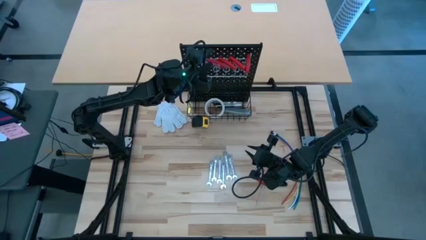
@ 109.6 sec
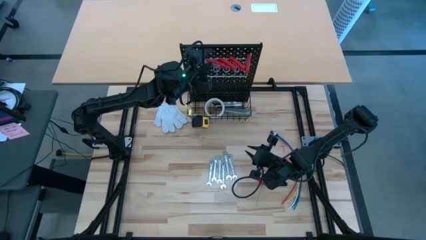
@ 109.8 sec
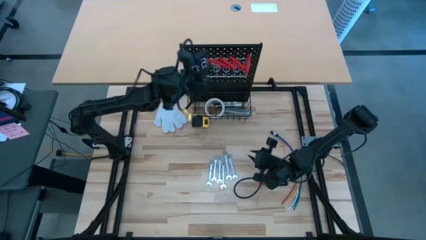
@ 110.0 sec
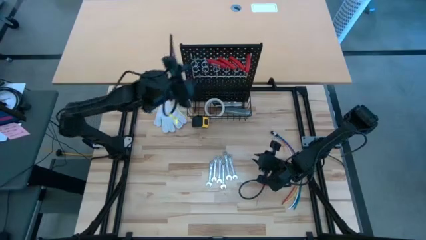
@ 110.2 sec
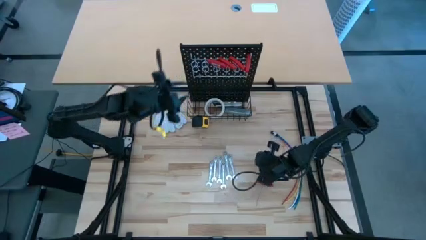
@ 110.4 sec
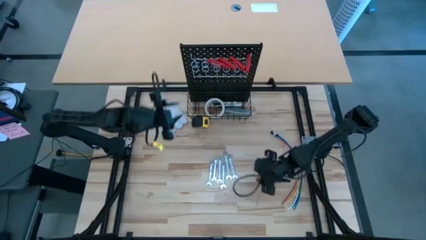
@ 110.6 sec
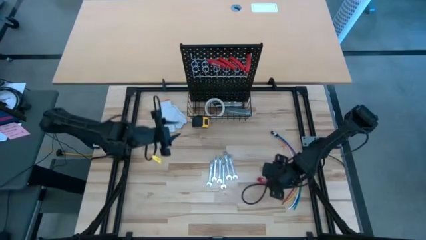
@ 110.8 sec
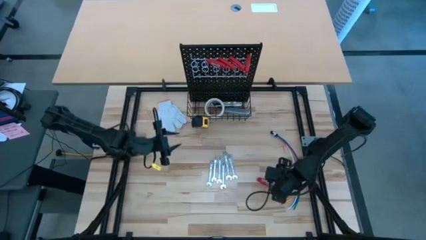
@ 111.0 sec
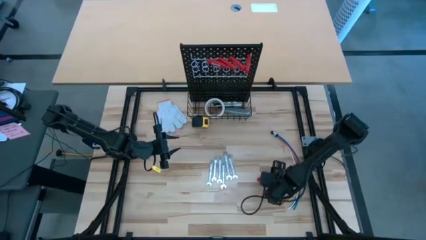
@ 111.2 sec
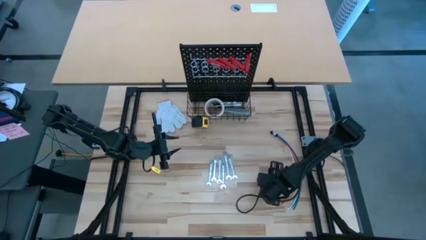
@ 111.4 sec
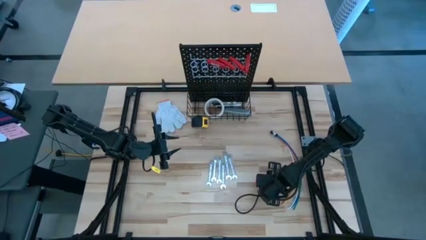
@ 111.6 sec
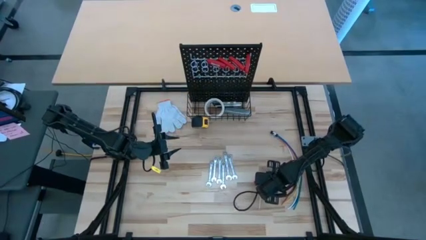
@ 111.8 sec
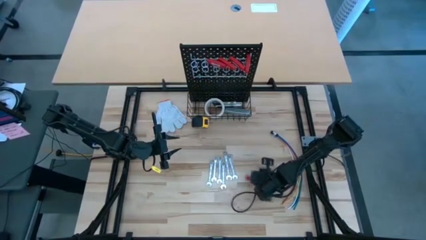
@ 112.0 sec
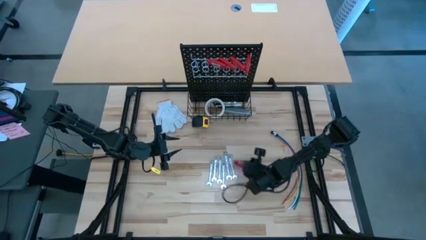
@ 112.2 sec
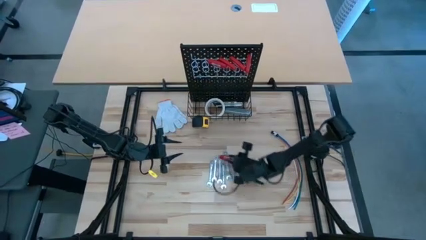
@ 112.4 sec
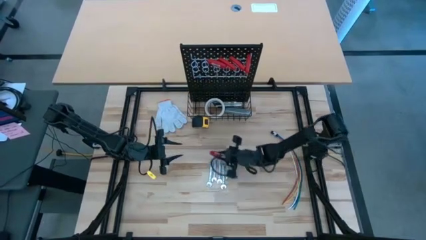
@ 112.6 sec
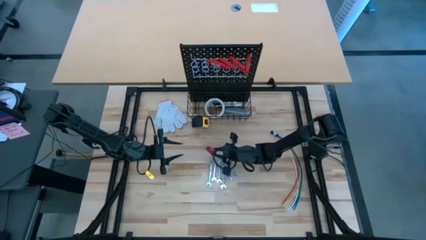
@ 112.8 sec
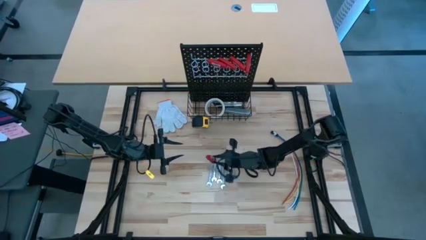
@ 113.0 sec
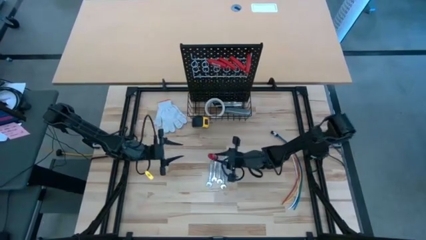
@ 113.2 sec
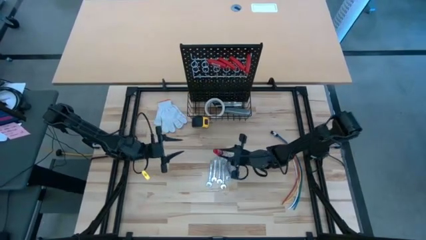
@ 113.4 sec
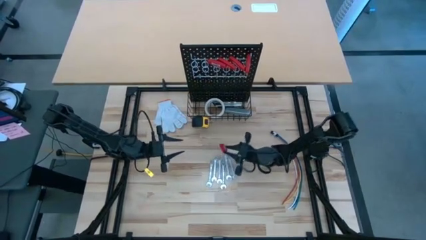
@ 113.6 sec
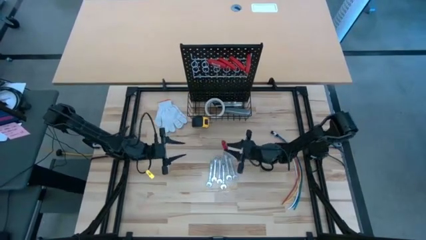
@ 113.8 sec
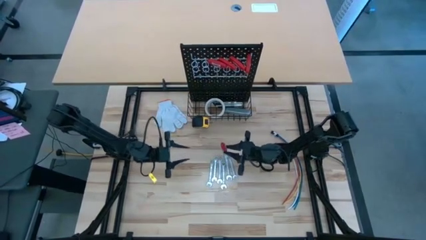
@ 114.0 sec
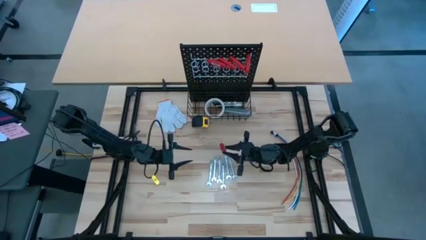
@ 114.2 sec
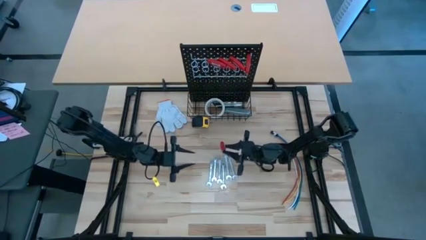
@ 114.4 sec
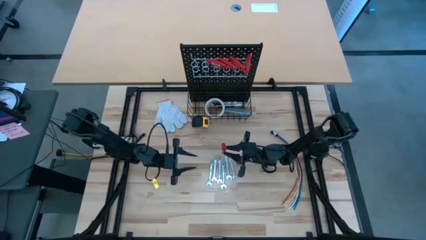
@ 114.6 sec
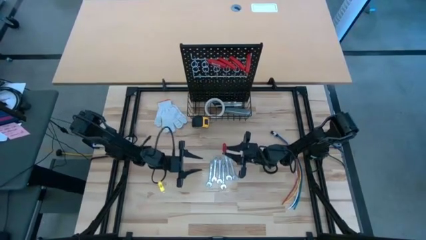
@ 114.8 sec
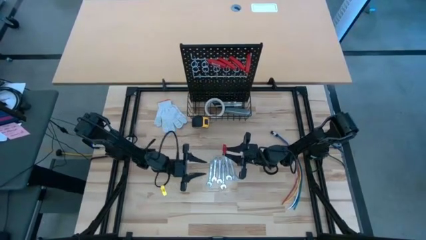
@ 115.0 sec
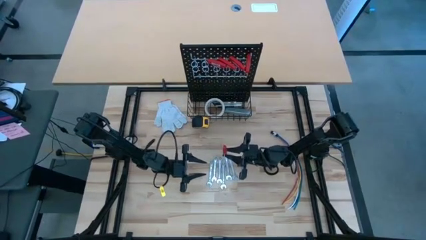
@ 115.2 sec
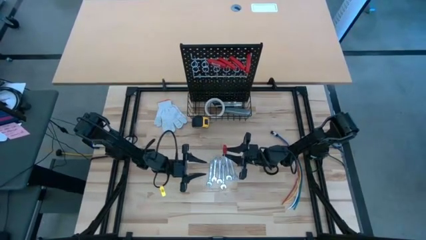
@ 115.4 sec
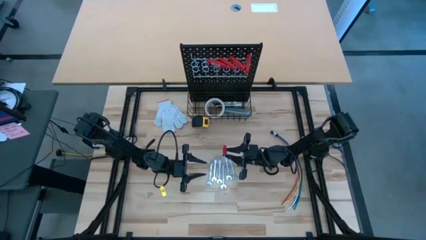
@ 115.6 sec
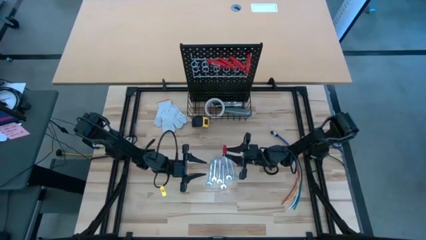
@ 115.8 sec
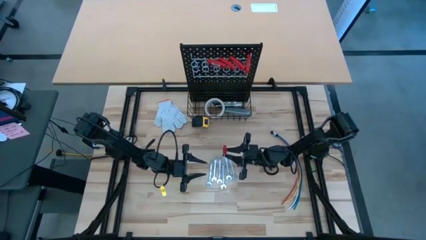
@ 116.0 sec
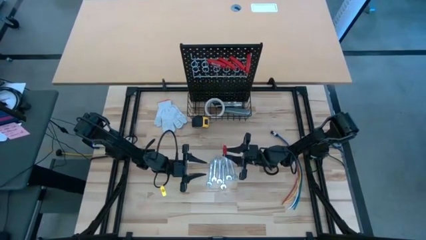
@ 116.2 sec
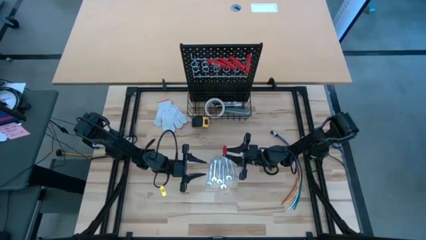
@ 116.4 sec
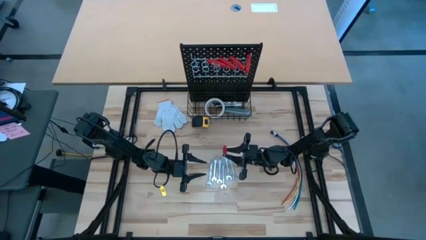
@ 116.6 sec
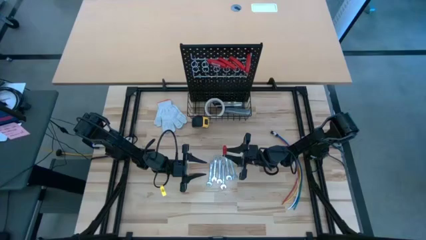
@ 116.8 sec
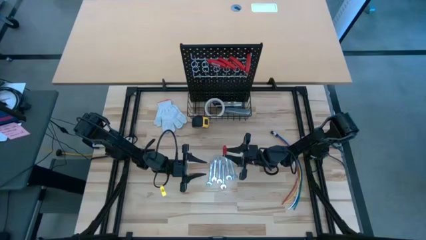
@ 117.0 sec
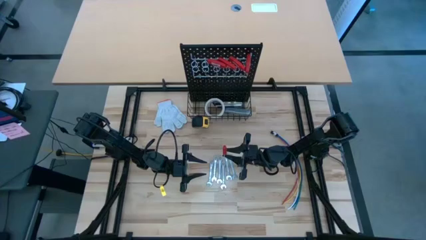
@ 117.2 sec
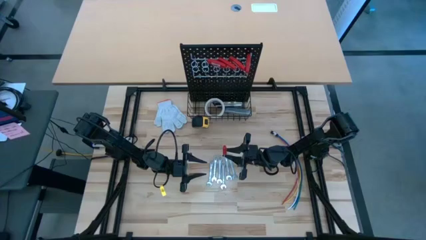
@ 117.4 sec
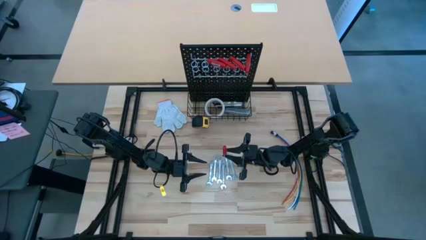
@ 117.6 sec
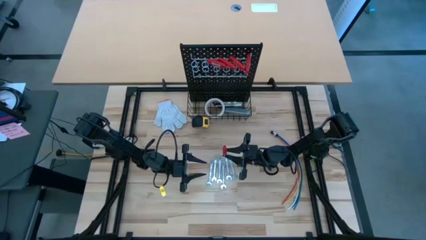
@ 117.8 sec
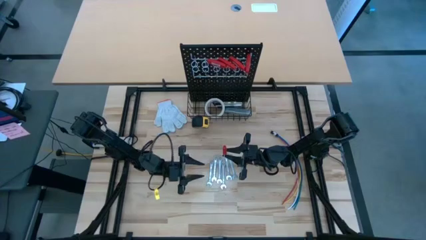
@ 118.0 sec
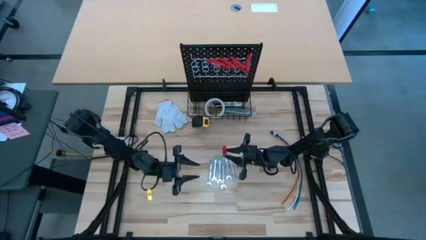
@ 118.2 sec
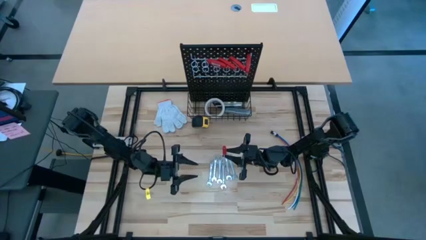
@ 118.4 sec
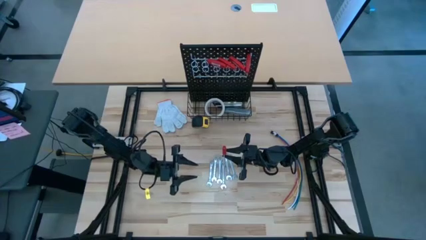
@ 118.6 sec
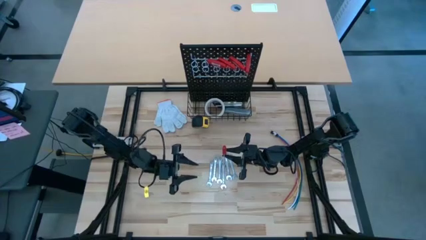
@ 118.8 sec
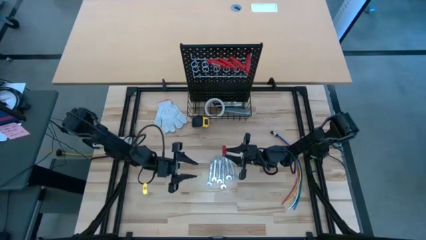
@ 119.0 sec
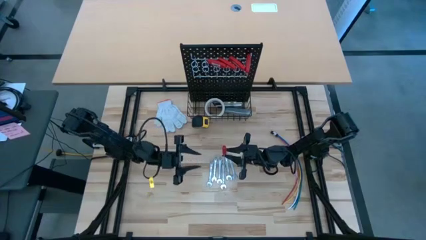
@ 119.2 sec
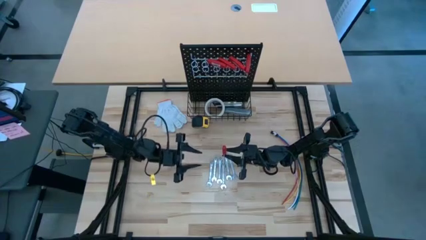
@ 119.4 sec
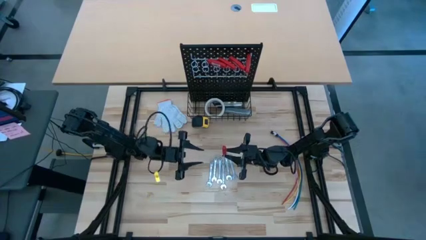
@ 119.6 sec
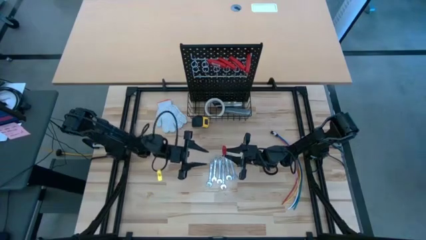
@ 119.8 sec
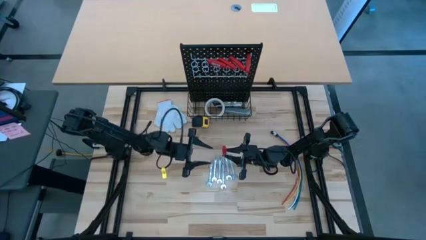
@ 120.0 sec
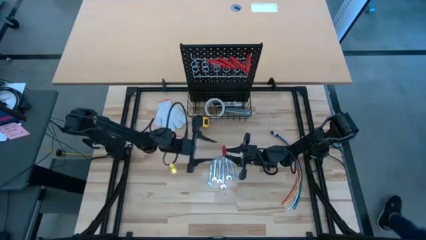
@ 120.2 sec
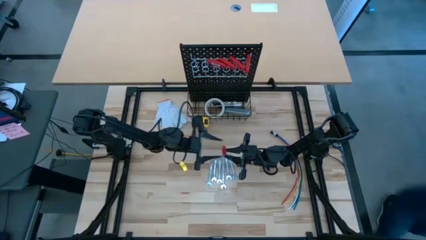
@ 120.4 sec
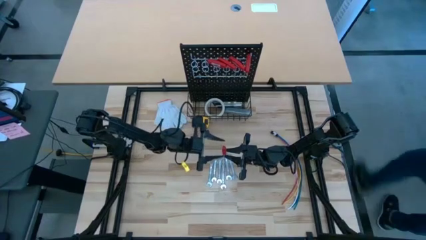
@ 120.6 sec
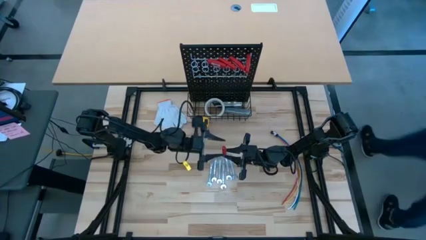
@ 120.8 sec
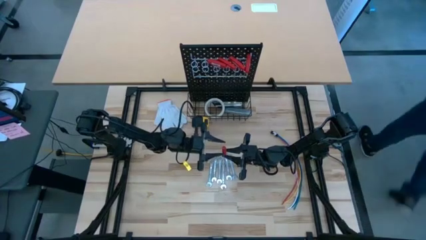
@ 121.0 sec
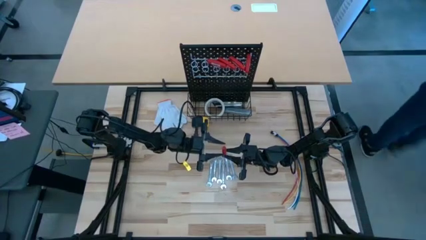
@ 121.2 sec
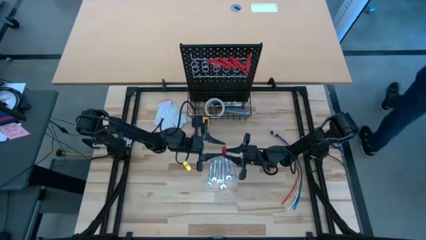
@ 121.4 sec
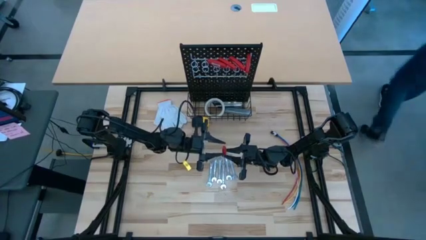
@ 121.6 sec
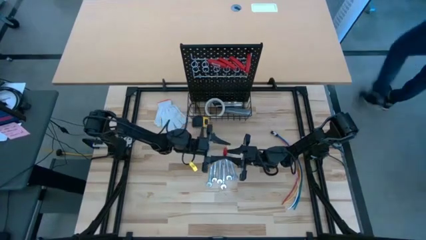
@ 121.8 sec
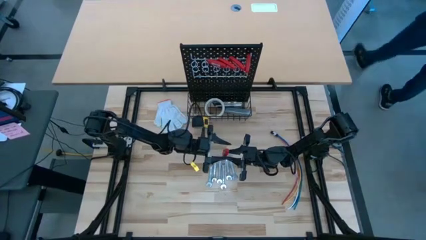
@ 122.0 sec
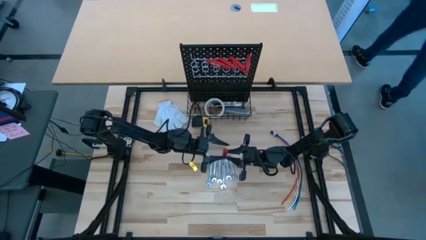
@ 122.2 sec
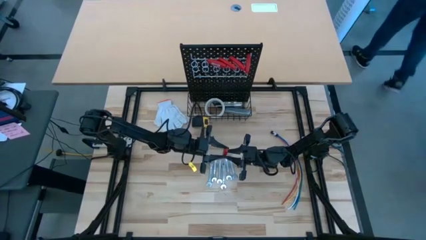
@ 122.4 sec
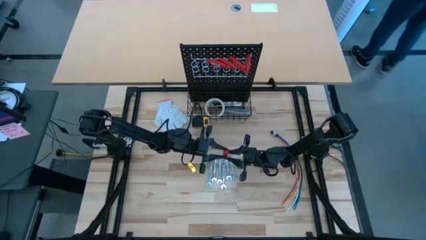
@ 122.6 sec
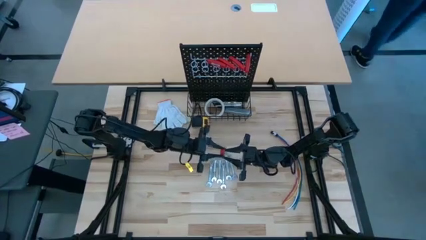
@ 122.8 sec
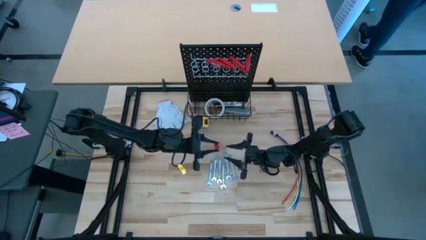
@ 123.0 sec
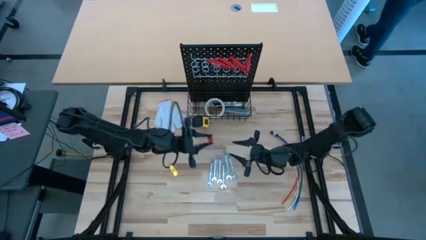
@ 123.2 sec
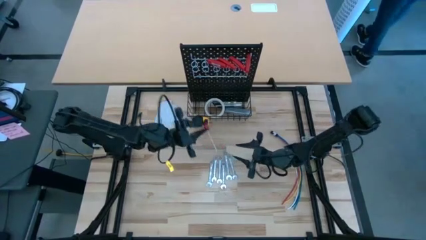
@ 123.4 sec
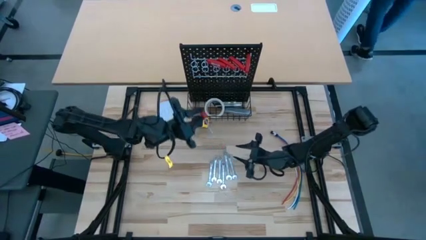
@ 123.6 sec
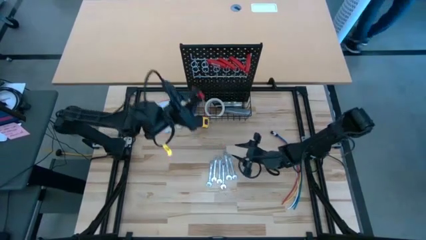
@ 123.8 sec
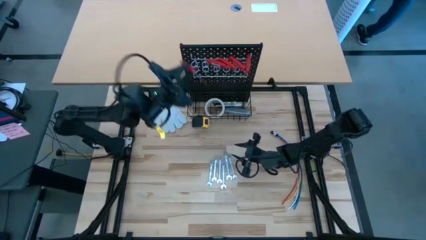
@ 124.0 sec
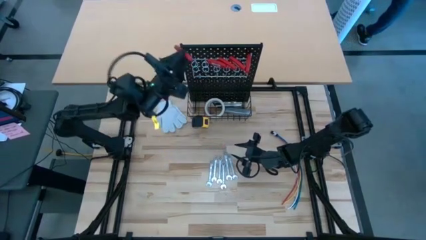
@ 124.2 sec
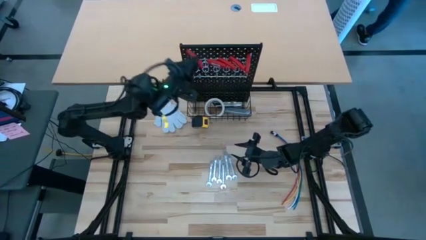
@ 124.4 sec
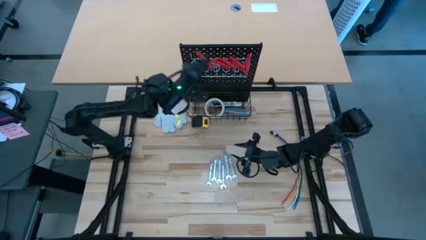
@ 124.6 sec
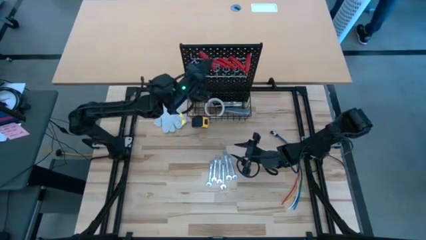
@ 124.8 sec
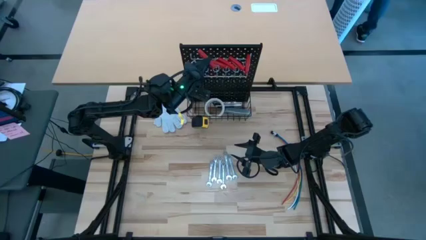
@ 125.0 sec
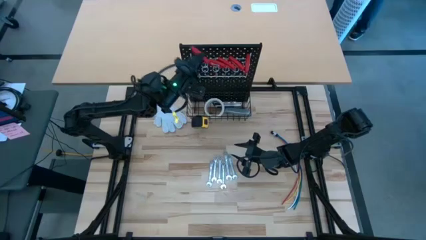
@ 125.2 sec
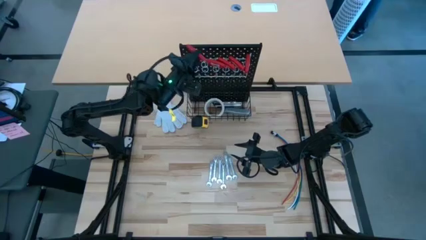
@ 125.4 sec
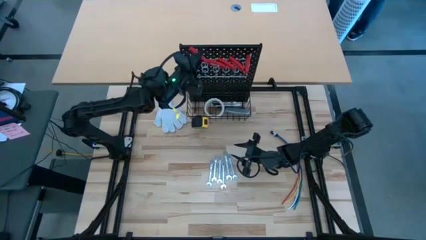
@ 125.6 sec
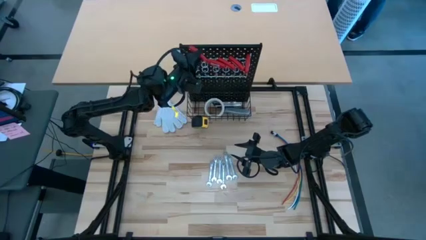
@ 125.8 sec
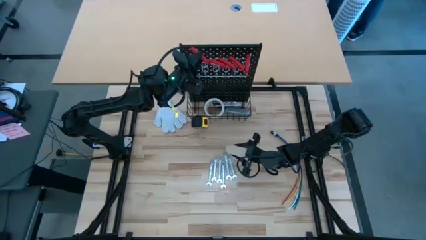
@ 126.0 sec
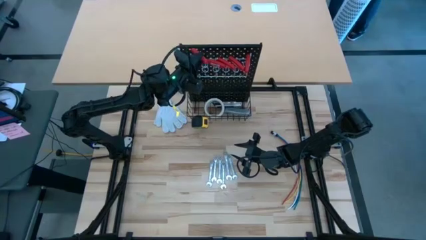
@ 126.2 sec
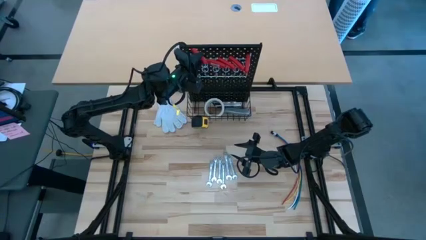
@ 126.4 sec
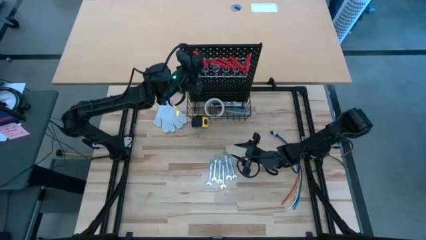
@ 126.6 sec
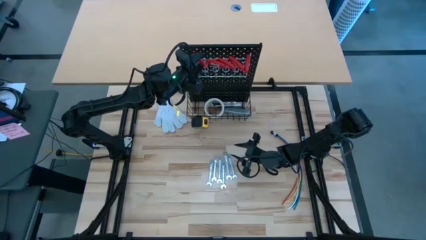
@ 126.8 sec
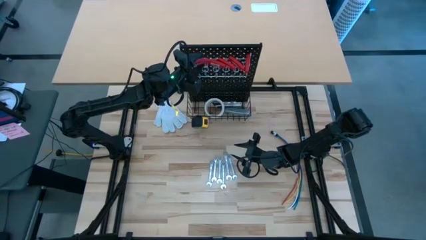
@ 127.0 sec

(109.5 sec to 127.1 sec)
Task: Hang tools onto peg board
Hang the red Allen wrench on the pegboard
